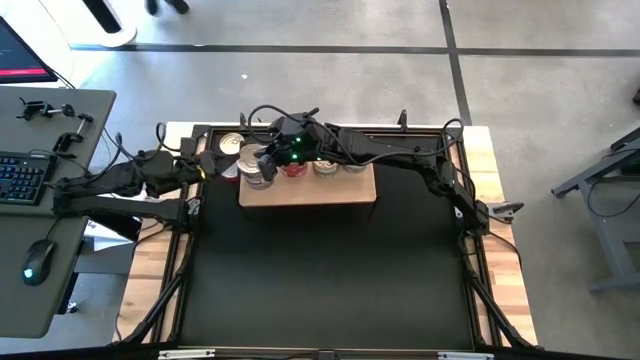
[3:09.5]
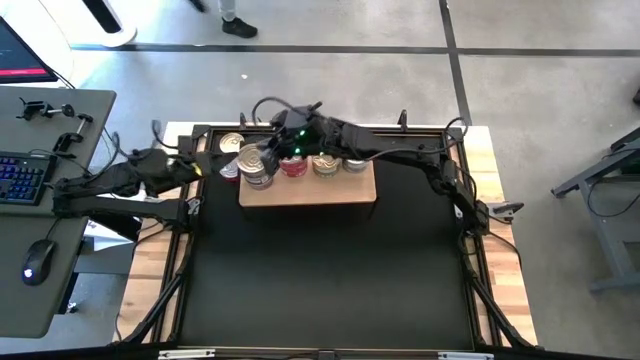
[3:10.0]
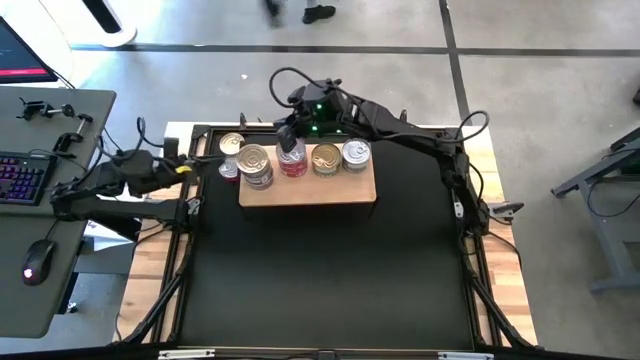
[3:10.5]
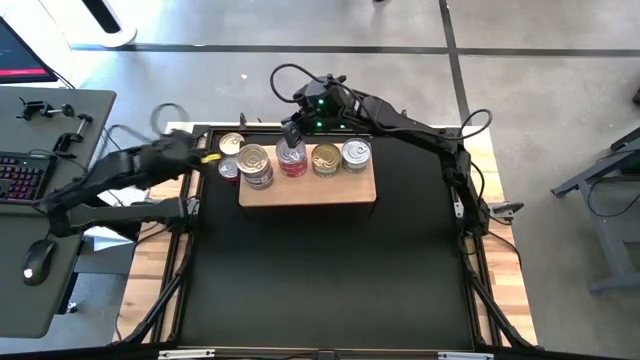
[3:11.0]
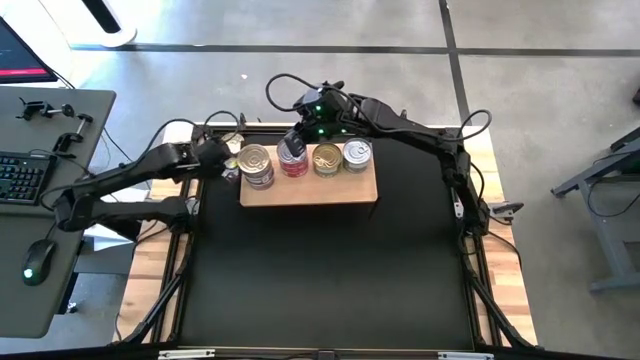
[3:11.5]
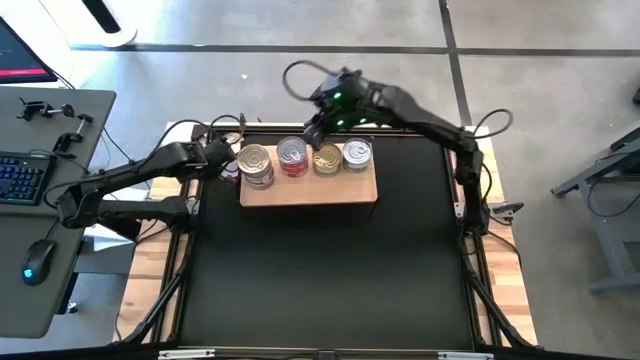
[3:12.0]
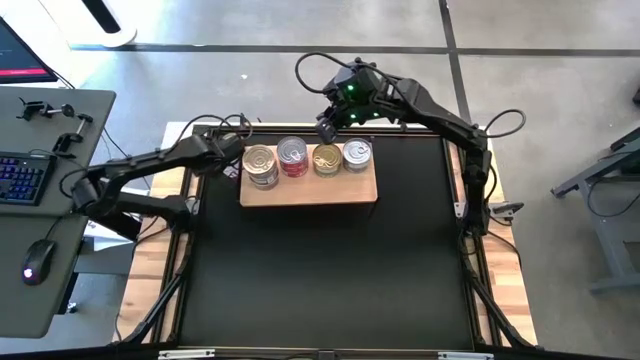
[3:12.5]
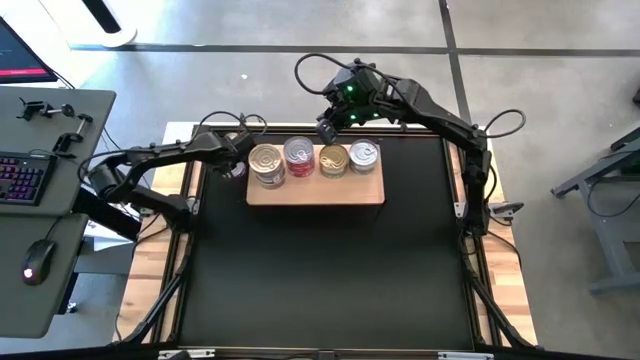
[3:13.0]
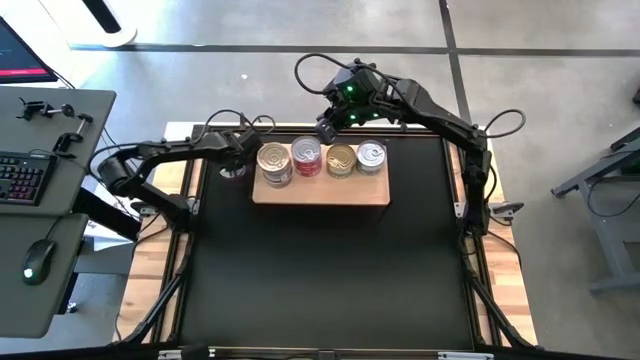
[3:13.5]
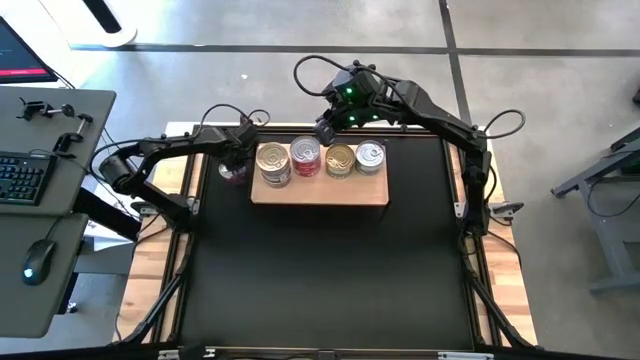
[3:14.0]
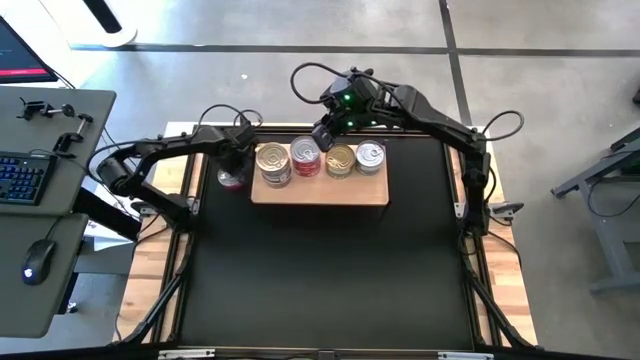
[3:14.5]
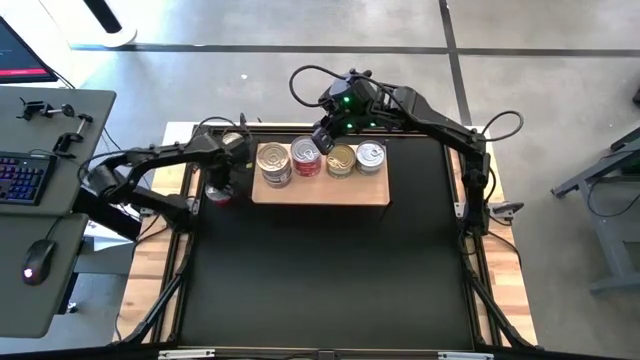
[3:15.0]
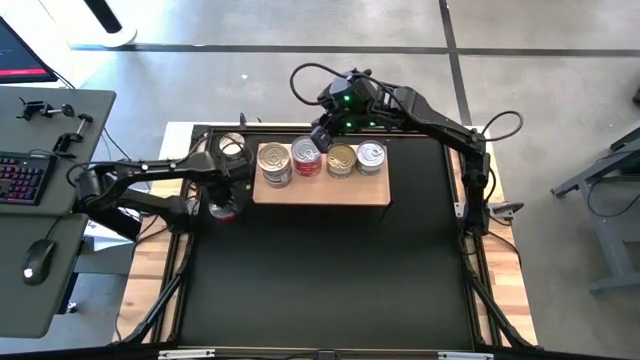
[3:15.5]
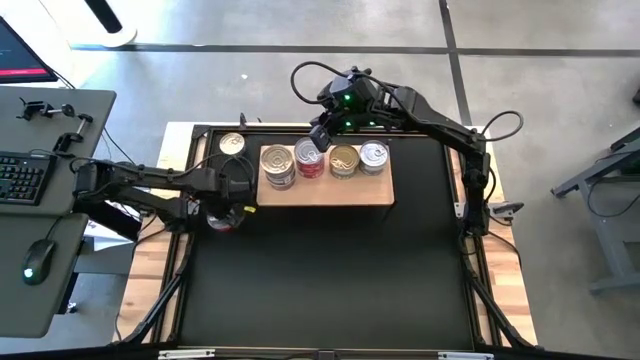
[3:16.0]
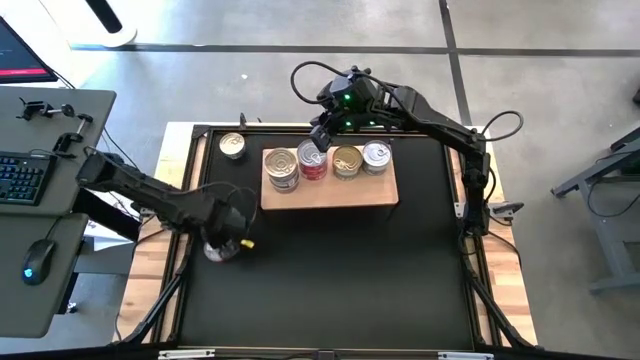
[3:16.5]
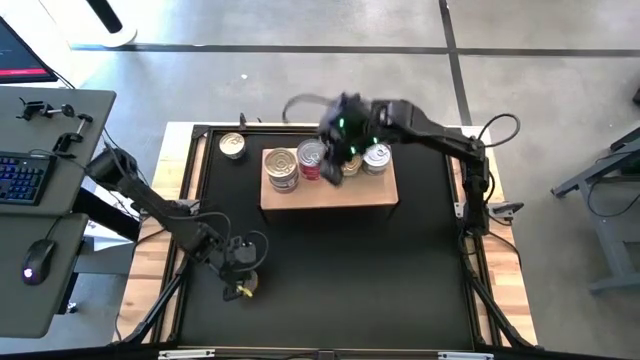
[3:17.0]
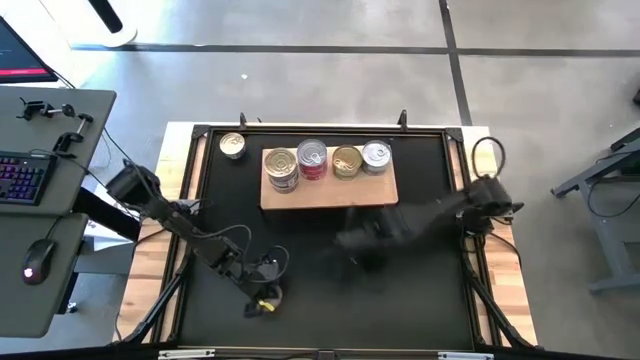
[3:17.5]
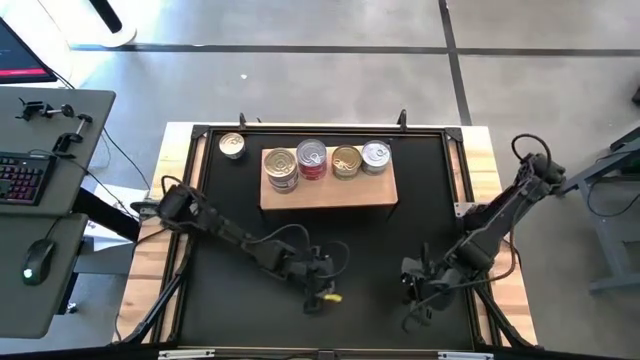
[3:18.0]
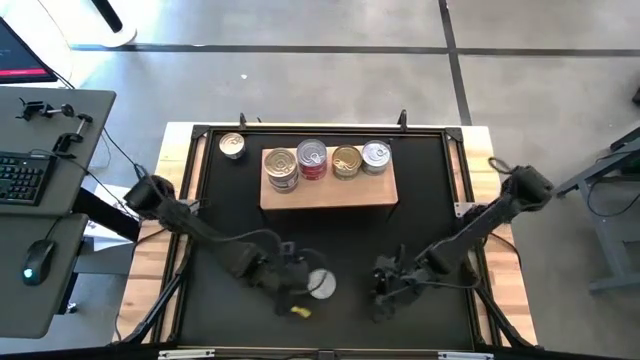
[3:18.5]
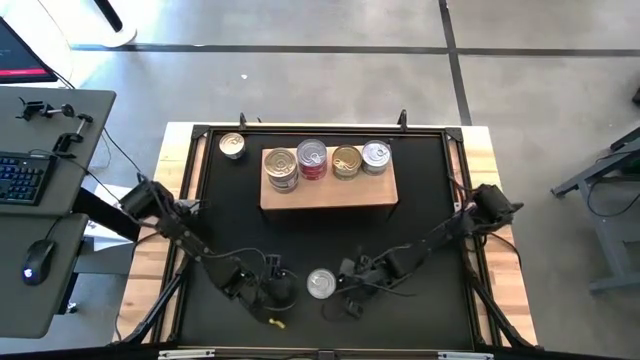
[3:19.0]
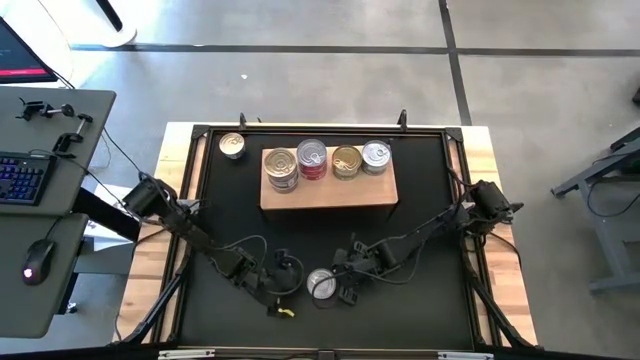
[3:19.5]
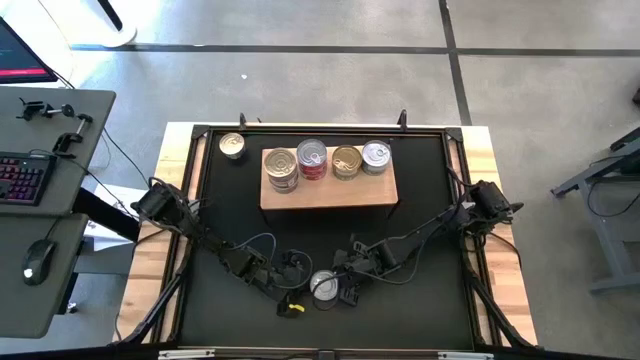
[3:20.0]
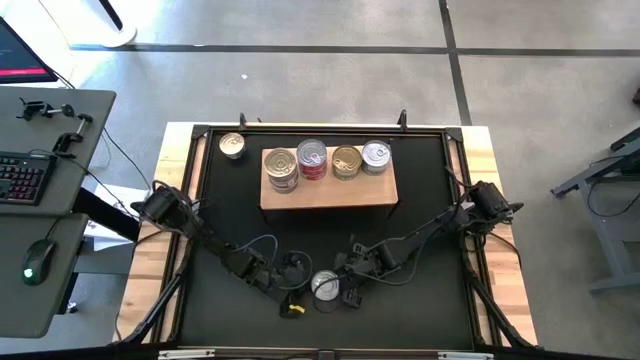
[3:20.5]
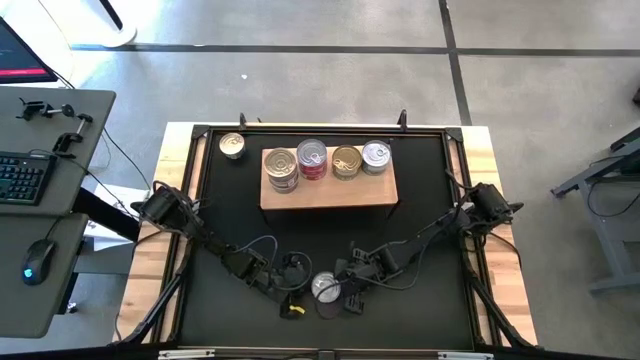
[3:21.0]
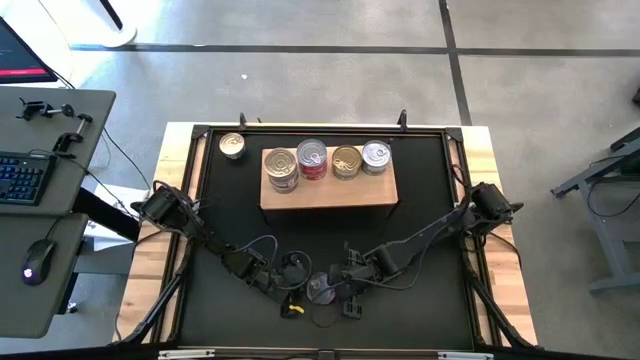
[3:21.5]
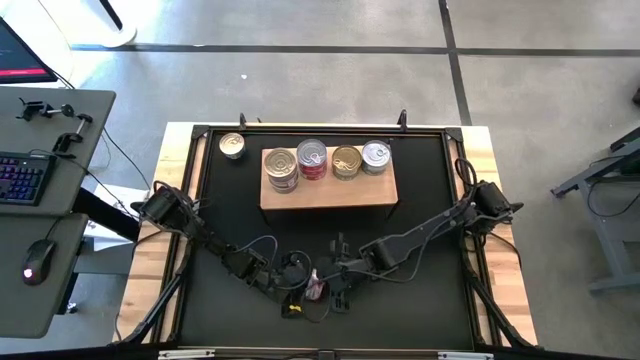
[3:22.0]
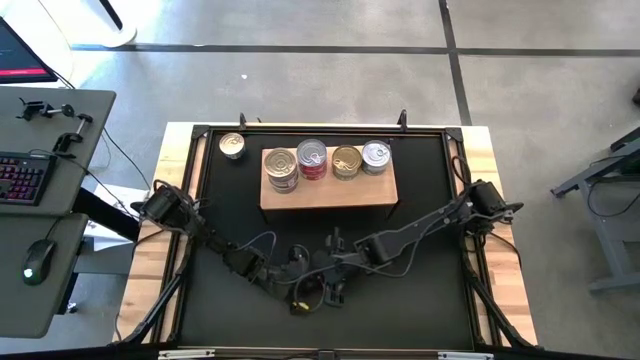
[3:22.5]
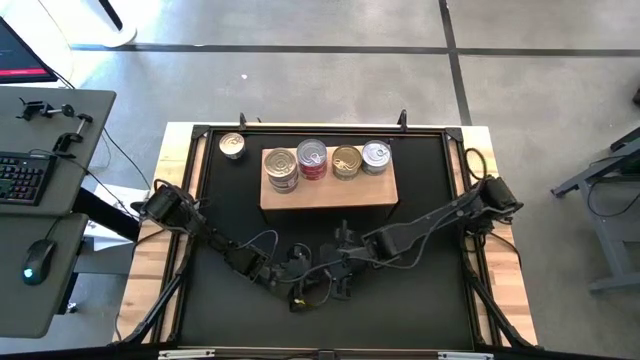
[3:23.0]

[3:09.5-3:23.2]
Task: Stack canned seafood by type on shelf
Stack the red tuna can on top of the red tuna cans on the shelf

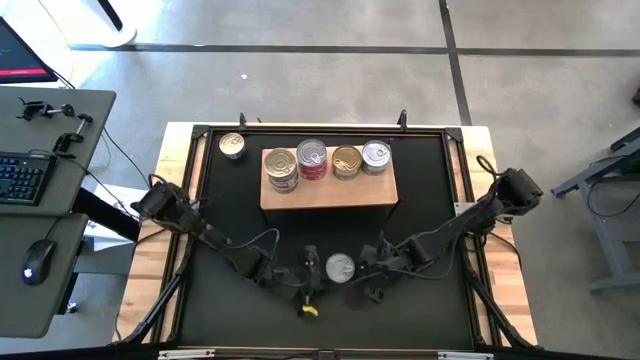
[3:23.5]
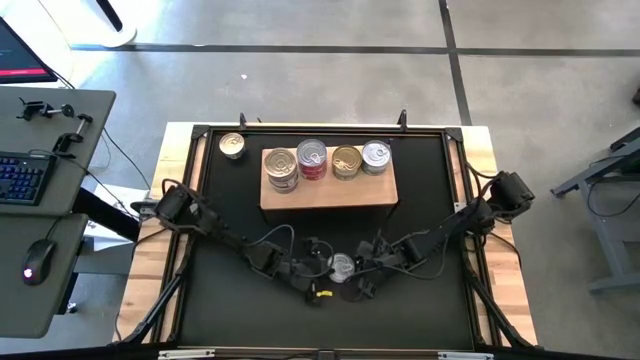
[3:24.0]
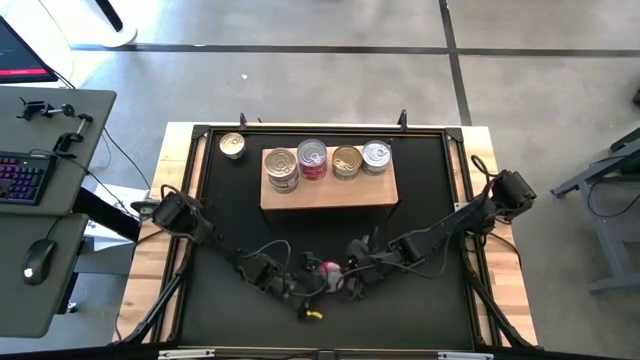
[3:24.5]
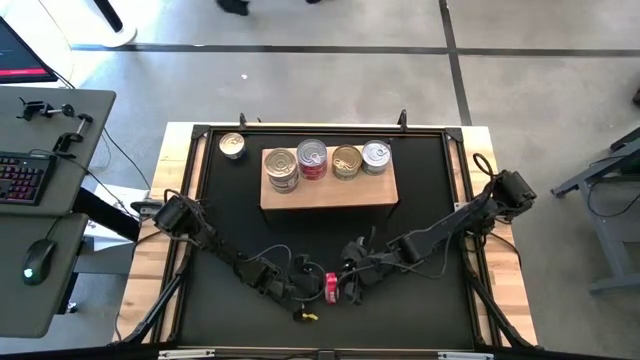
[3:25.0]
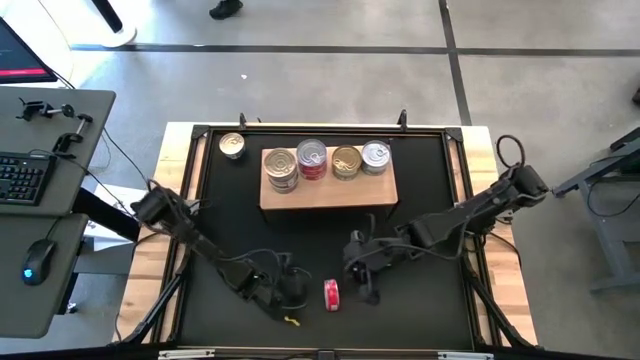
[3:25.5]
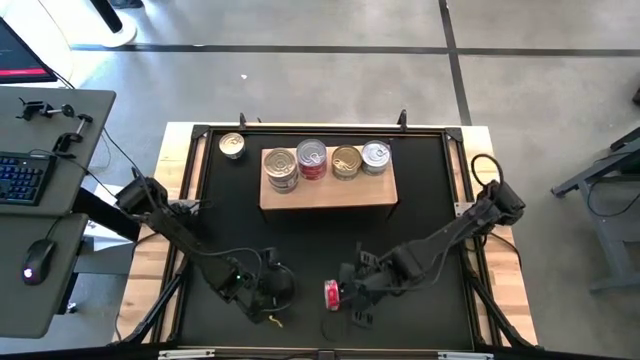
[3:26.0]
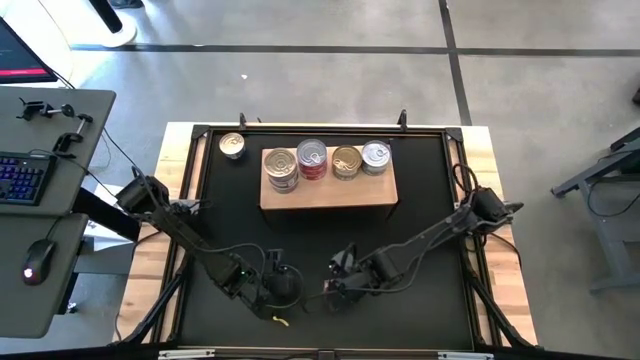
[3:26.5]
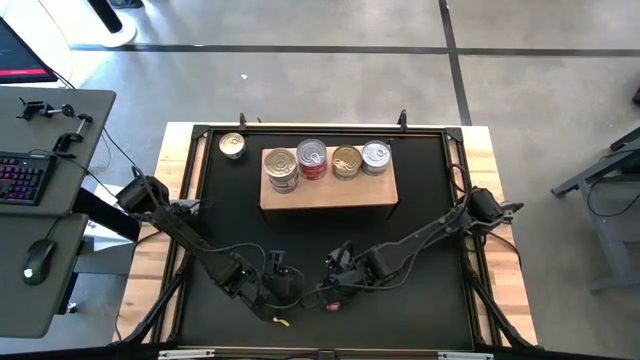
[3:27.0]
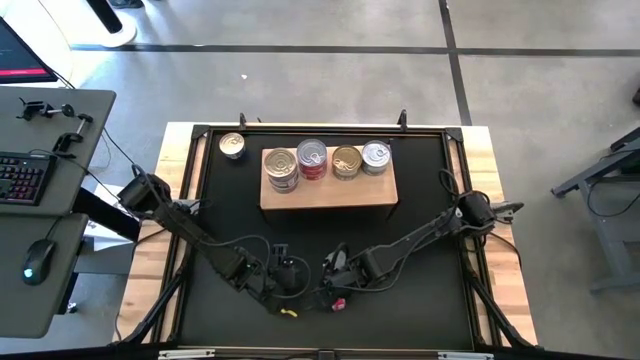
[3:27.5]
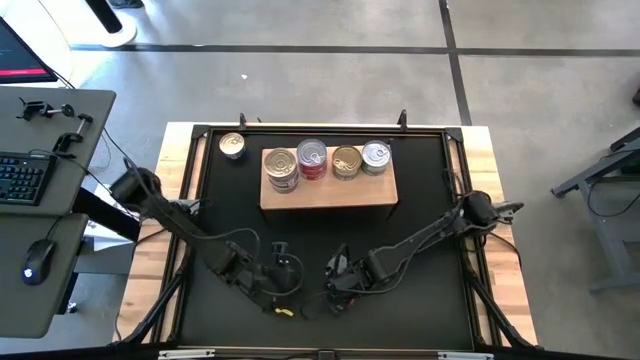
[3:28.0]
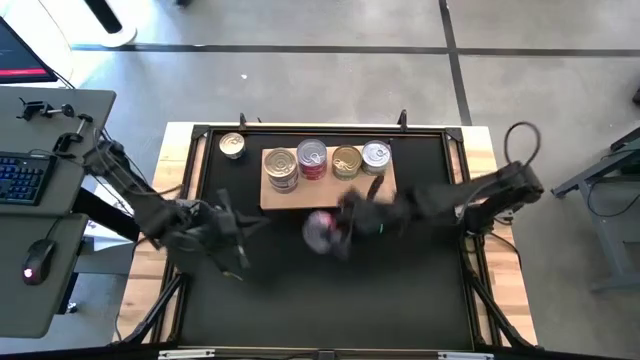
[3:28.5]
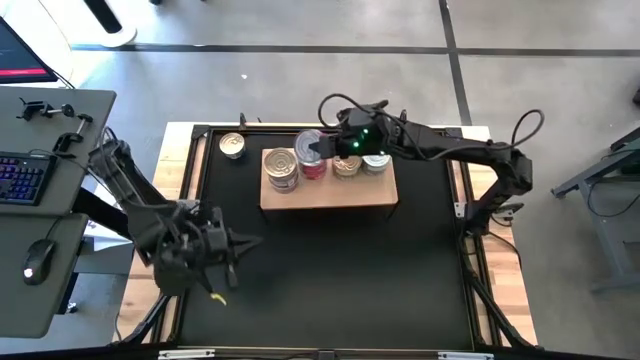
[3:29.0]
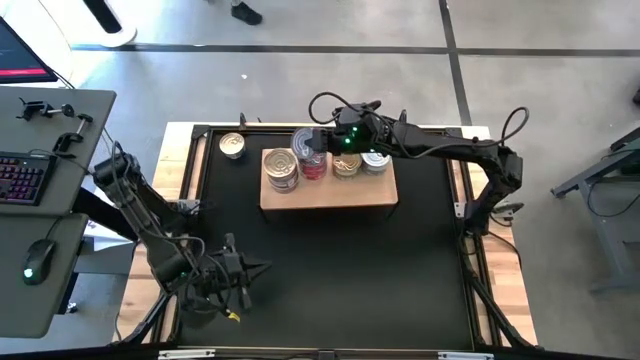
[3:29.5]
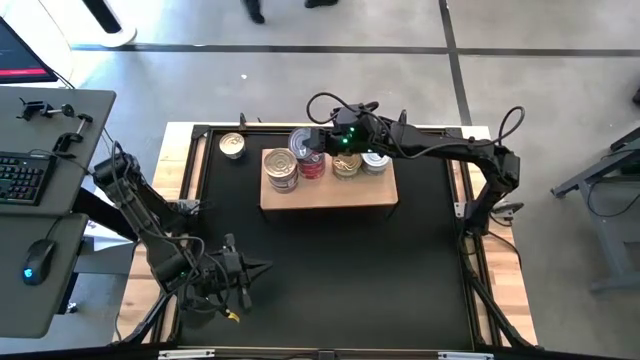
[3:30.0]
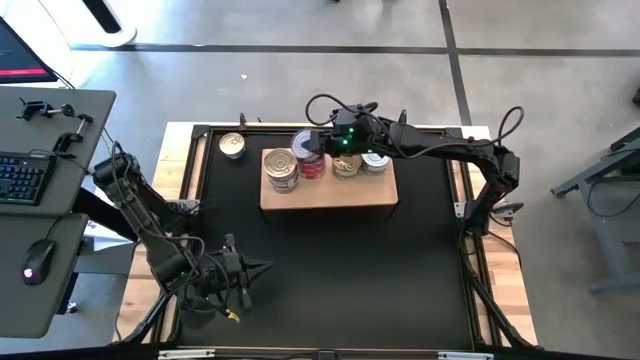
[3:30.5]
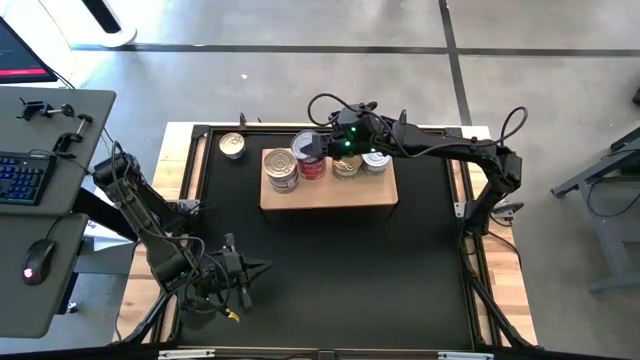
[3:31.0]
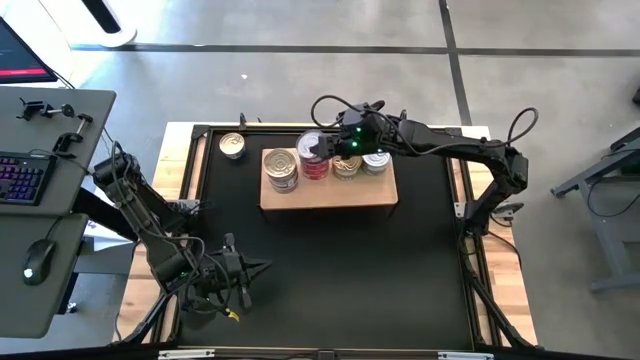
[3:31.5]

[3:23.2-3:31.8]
Stack the red tuna can on top of the red tuna cans on the shelf
